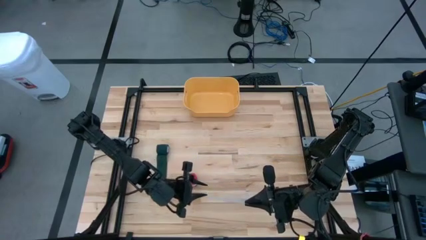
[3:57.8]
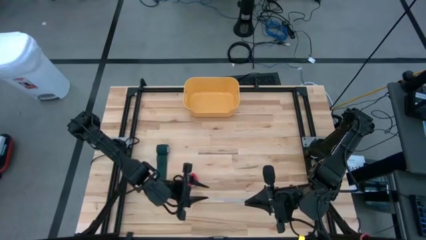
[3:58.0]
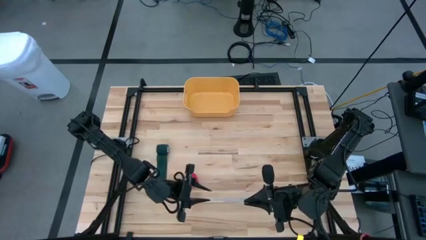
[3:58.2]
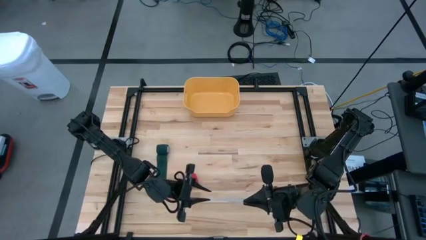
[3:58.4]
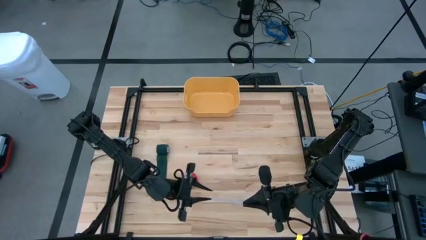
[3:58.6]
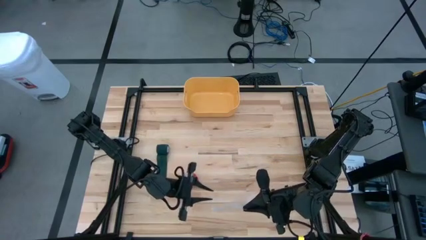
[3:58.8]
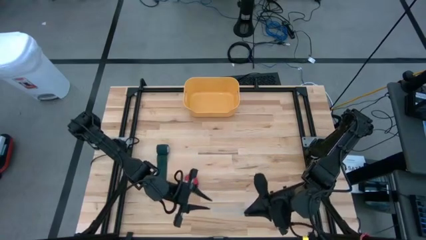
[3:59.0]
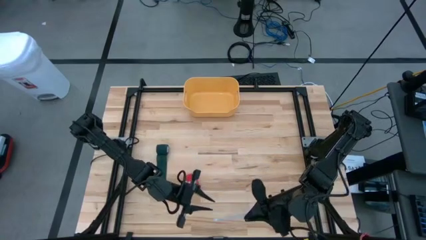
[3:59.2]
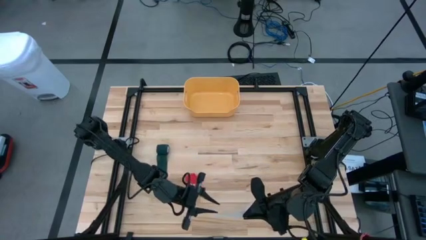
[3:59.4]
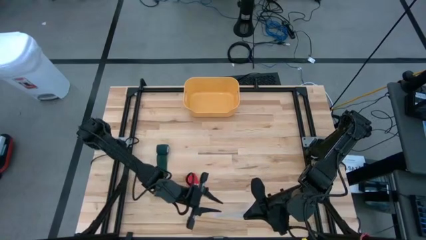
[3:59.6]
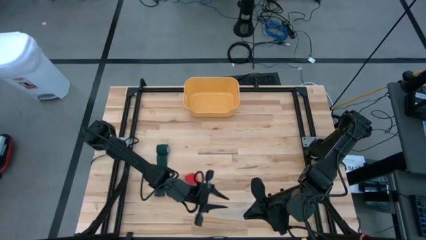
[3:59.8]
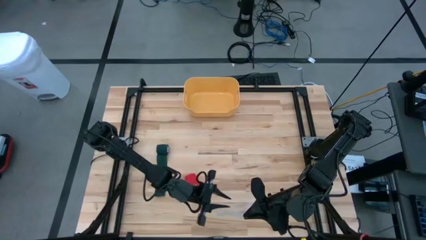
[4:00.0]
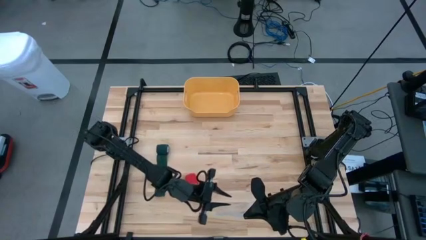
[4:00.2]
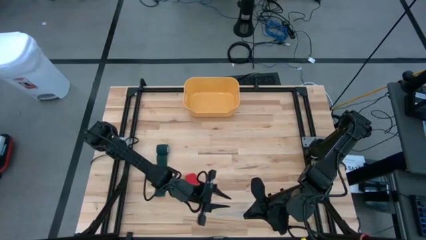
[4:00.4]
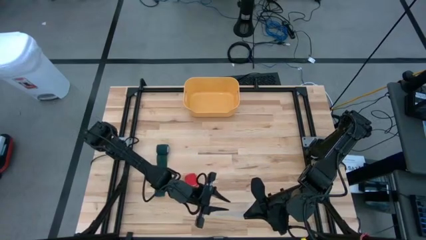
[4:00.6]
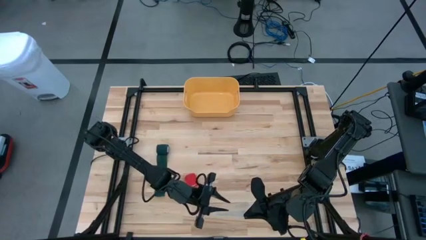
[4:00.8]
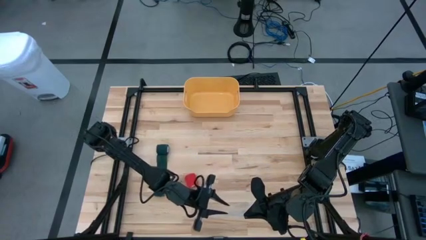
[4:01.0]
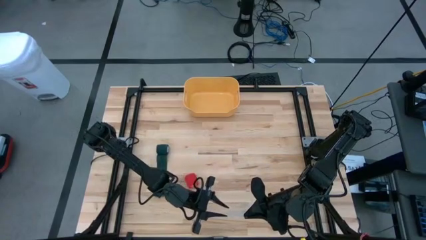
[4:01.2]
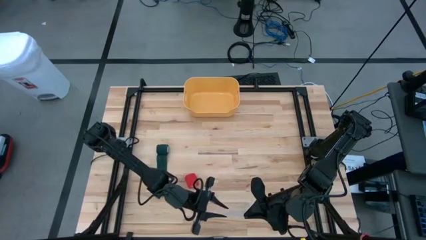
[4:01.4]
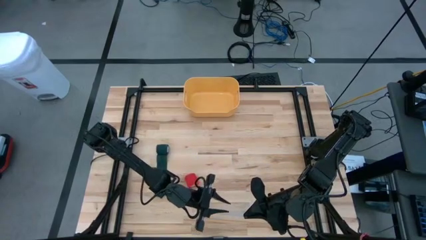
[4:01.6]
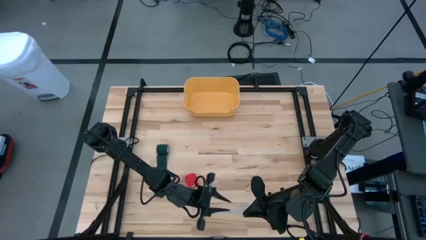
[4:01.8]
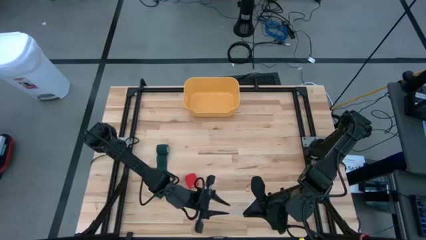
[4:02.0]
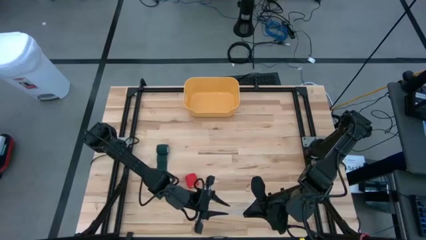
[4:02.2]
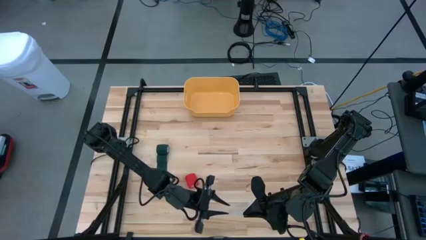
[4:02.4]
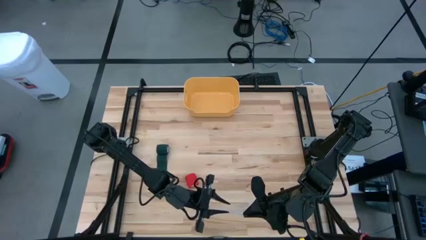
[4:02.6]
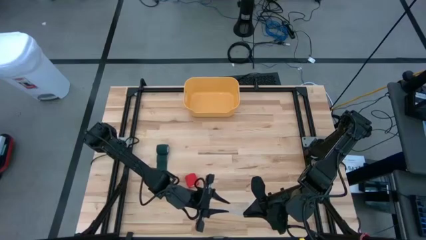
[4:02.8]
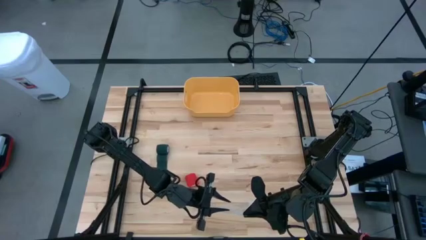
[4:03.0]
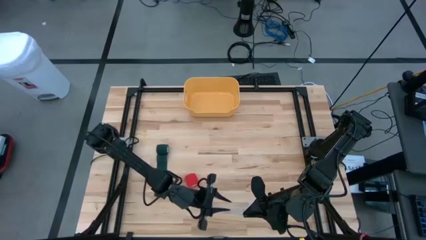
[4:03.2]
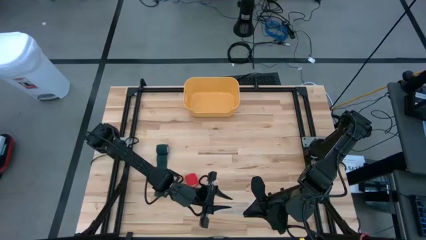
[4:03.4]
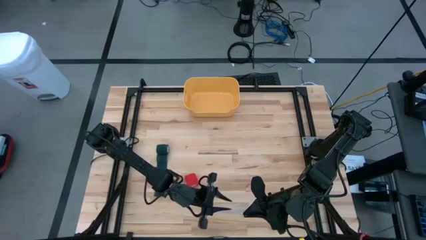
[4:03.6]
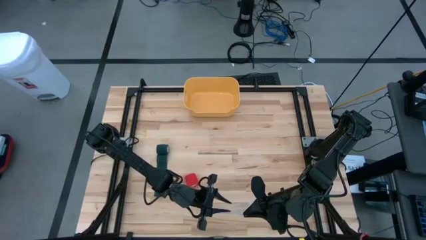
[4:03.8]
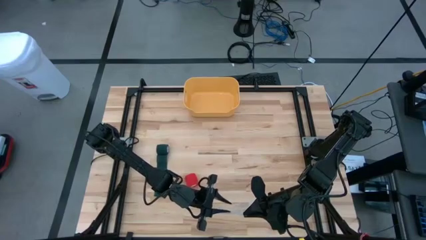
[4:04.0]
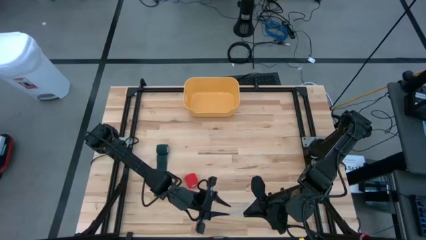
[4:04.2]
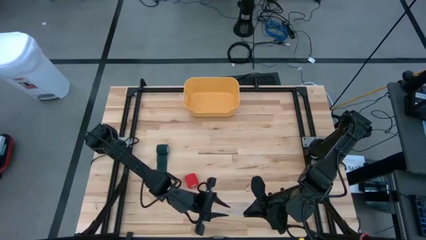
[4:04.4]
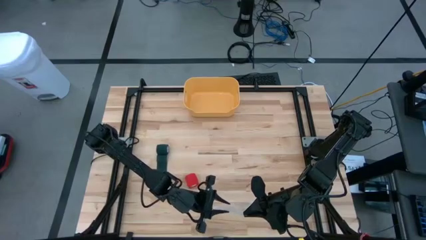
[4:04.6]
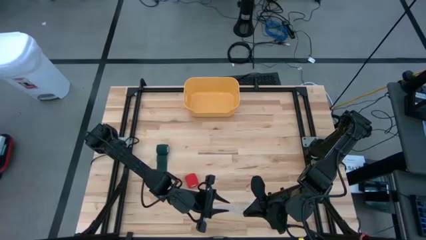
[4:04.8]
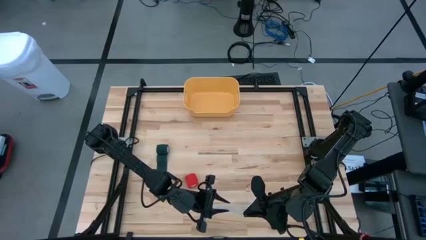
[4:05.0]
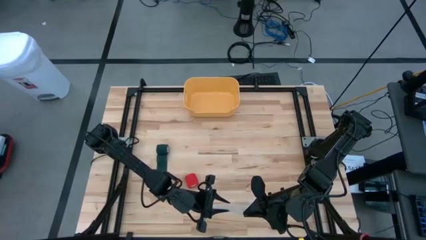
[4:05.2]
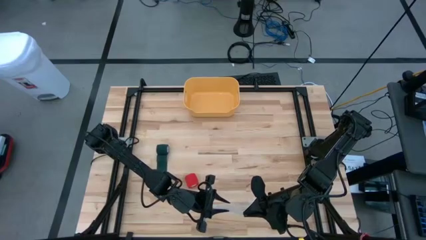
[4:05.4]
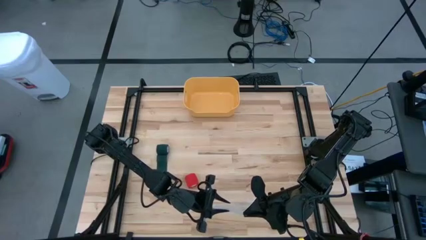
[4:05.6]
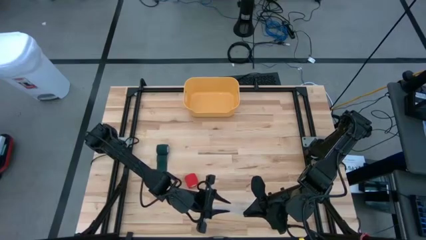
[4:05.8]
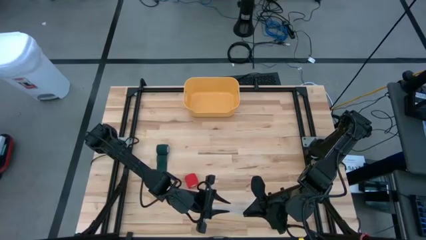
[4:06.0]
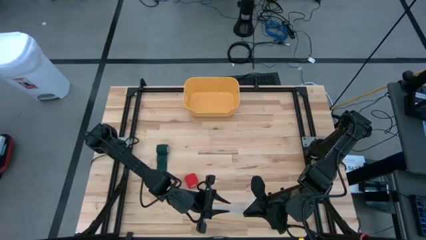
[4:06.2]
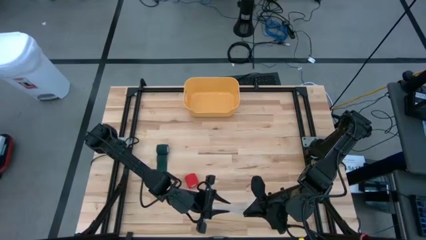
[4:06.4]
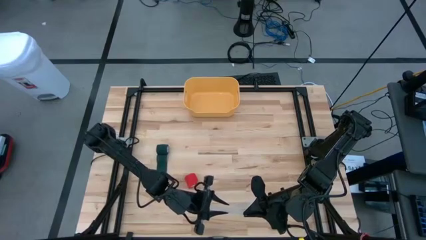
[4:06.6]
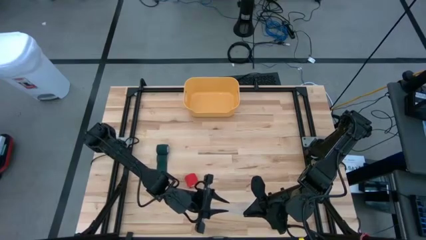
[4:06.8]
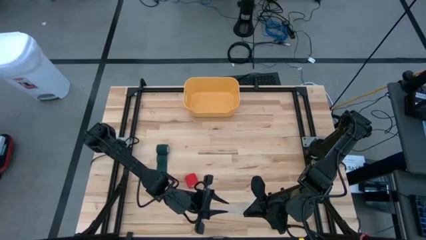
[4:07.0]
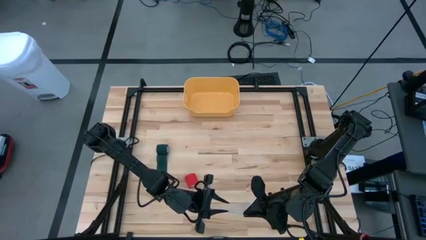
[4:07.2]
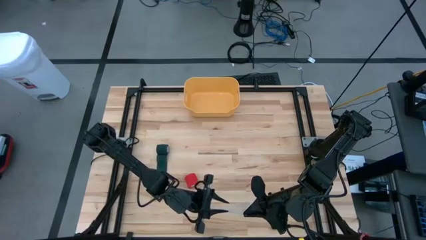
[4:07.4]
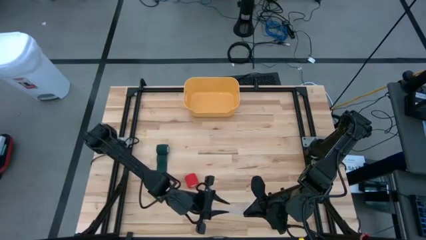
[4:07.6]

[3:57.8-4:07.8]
Task: Roll bandage
Open the transparent zip bag

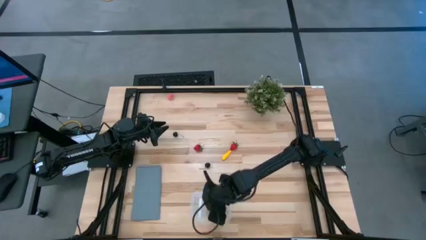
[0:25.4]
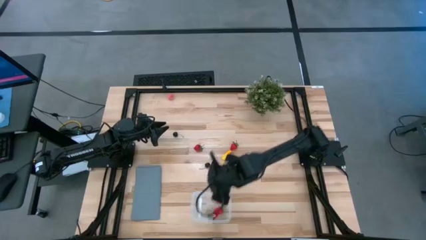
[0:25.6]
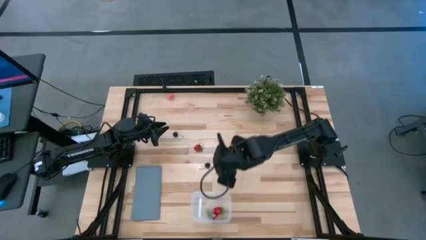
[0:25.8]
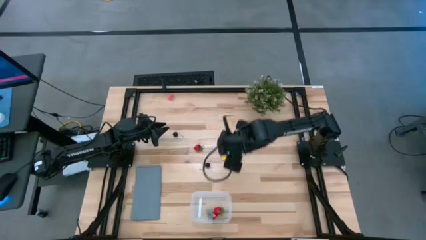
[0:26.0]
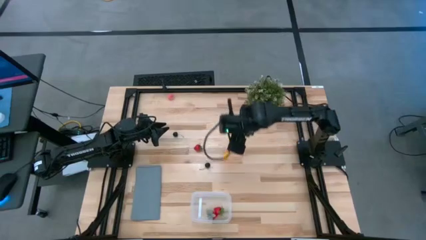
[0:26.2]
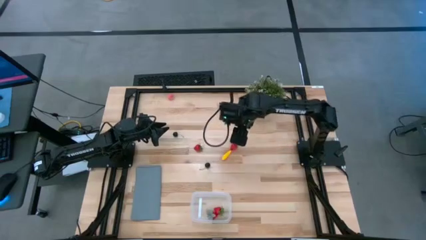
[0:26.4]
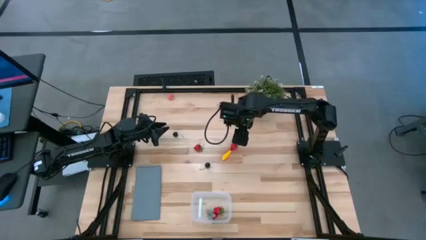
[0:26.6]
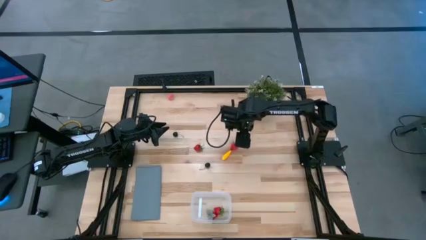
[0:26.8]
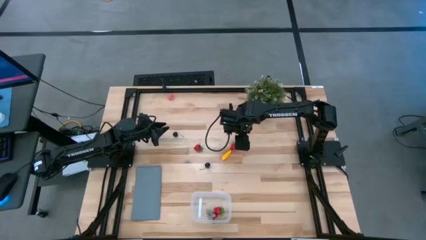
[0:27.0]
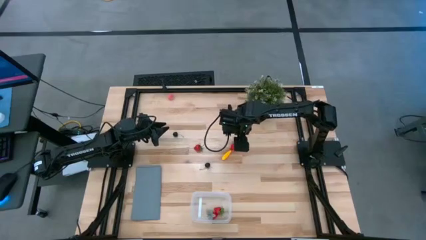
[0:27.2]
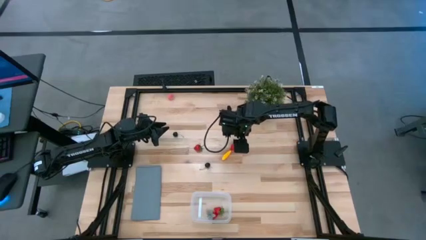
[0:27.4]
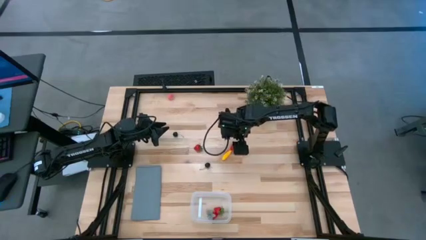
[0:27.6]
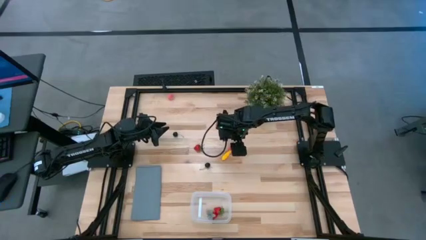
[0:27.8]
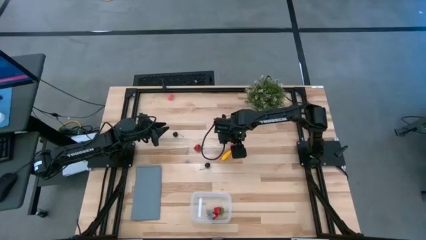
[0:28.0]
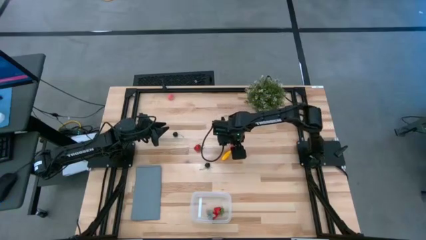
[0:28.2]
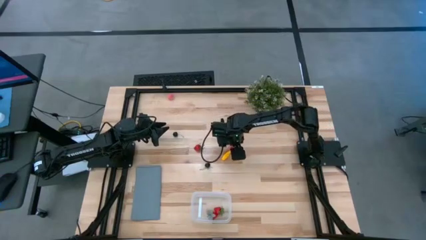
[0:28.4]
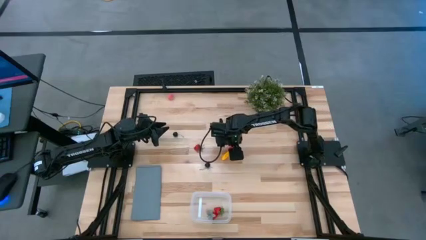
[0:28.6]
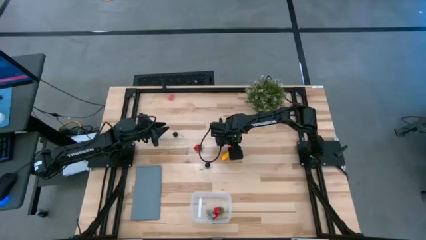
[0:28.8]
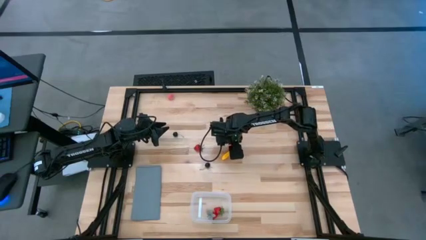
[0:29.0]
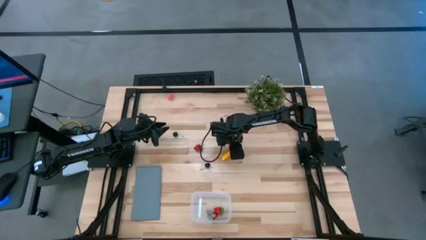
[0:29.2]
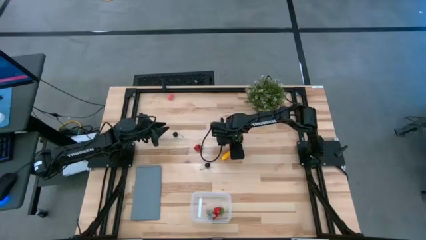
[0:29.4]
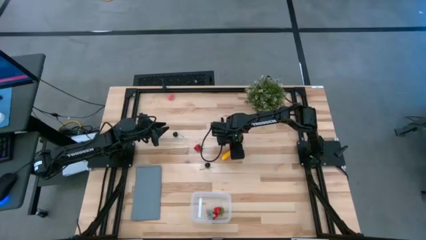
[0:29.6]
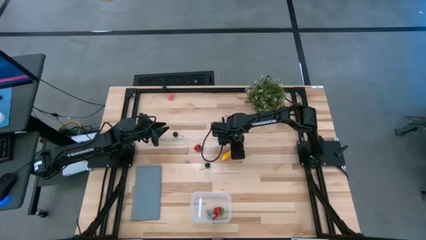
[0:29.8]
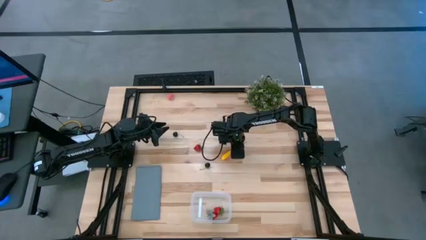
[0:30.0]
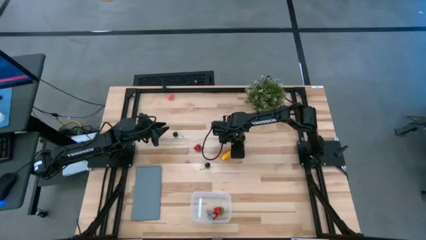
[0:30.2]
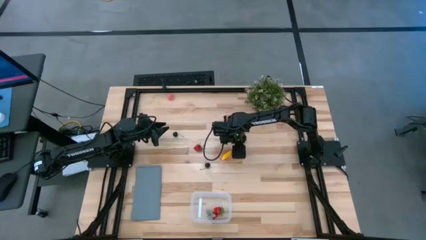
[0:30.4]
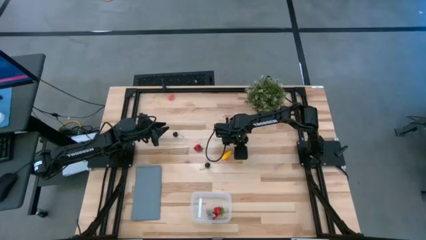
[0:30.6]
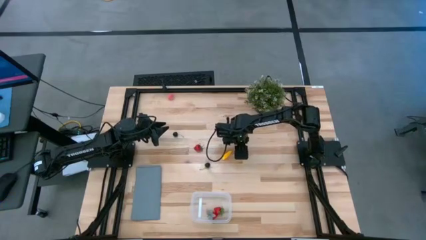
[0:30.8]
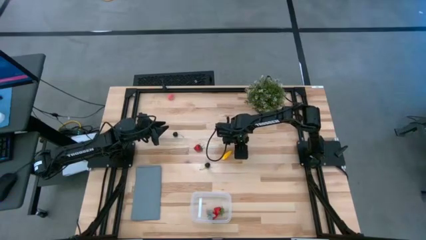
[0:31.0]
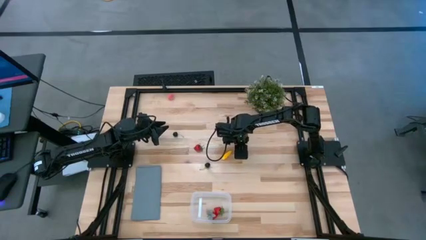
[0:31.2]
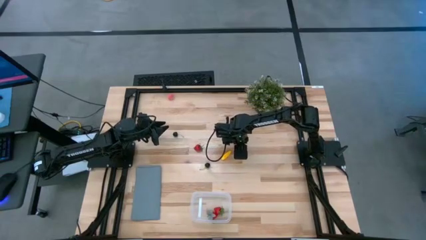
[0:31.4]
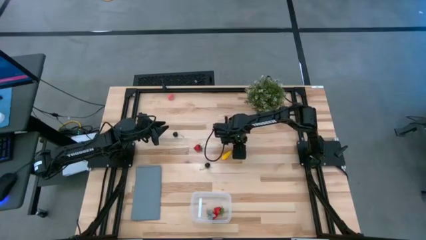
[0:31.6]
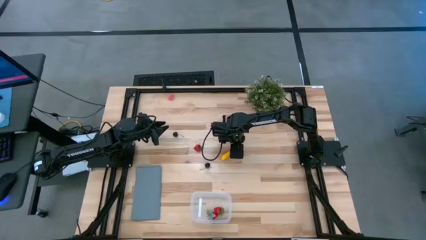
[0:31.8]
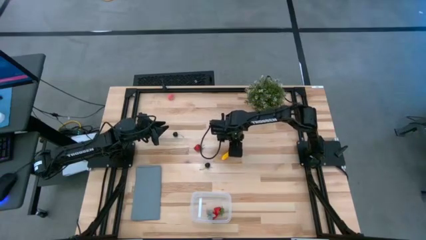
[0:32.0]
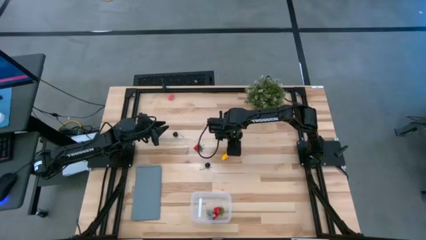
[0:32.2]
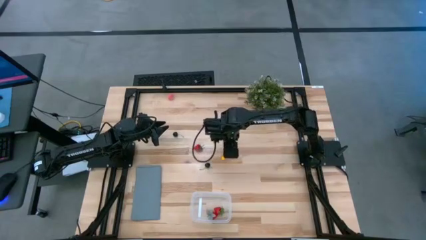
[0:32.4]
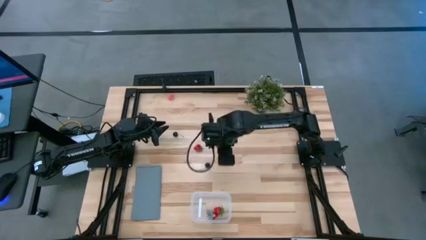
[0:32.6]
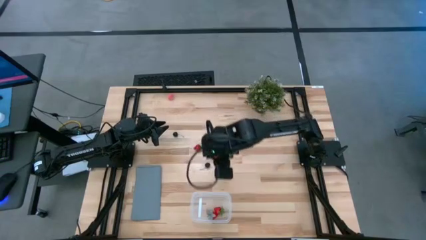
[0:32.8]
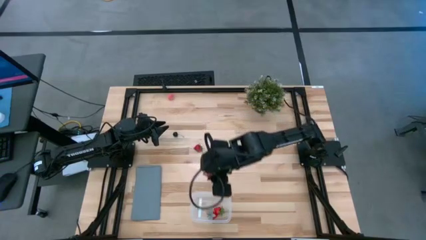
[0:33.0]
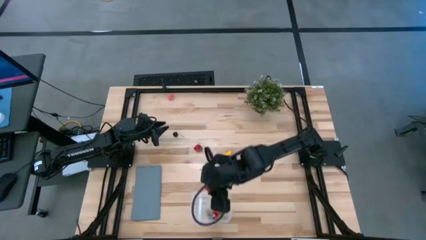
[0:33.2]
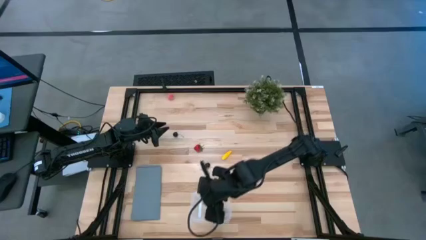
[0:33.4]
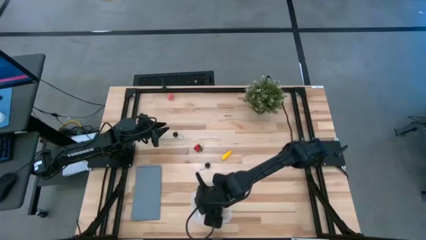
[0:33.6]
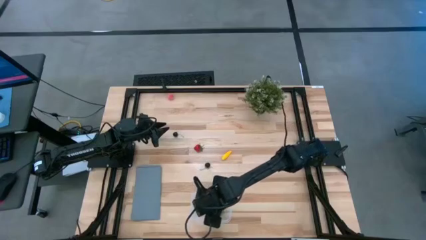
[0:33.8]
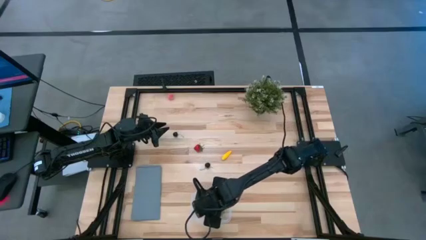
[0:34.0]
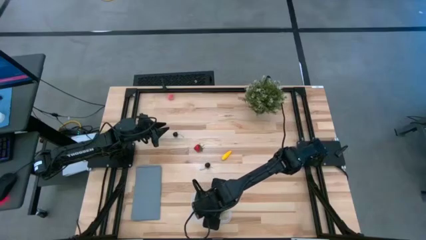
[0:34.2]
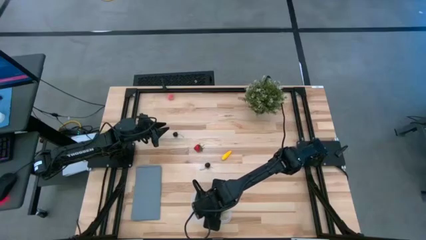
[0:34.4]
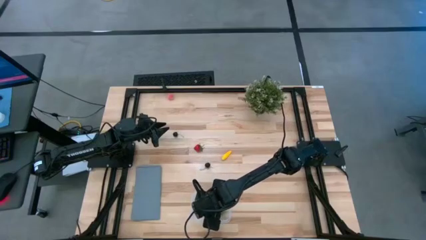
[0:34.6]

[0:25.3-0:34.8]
Task: Pick and placing Produce into tupperware
Put the red strawberry into the transparent bin
